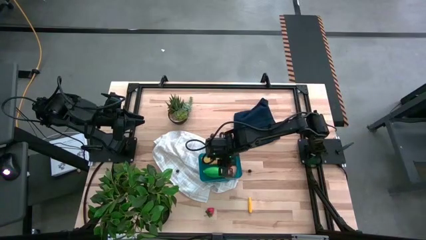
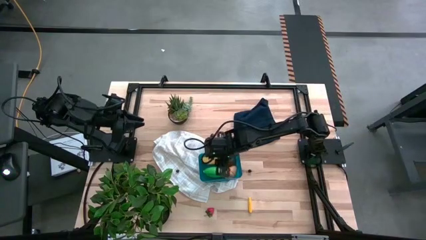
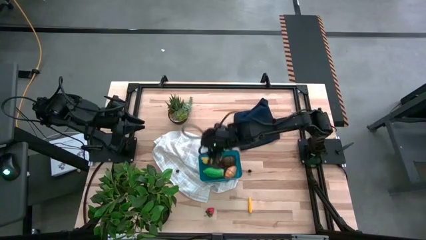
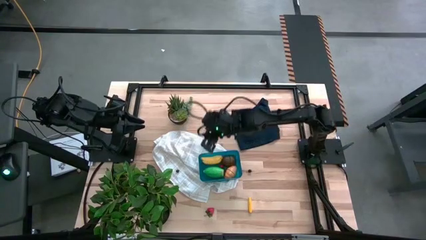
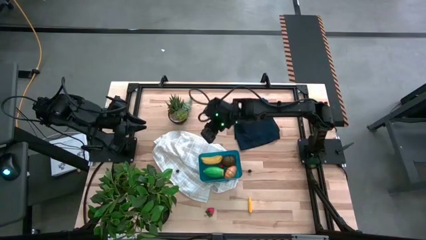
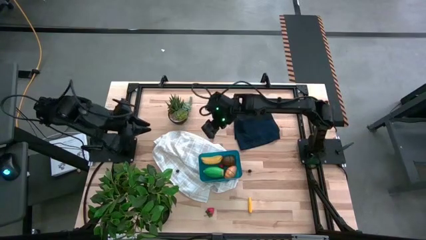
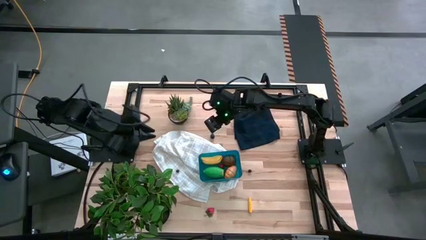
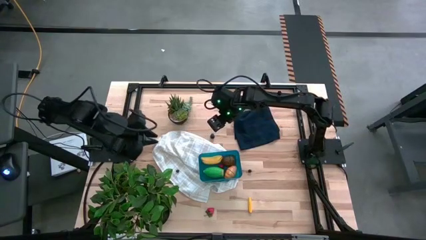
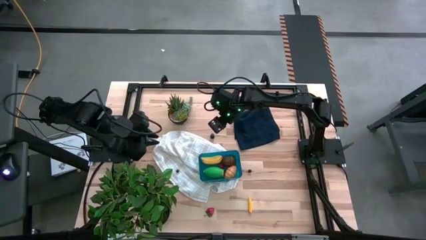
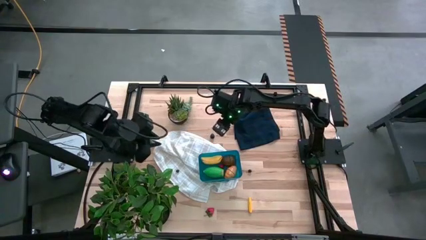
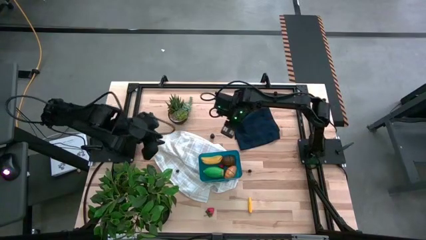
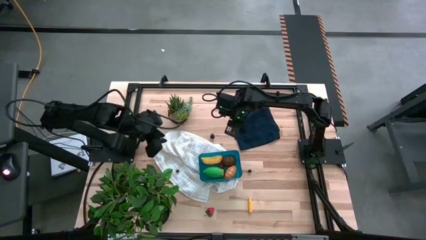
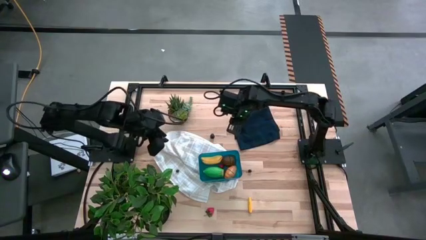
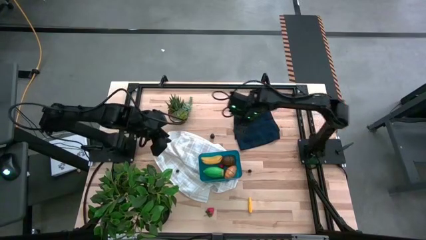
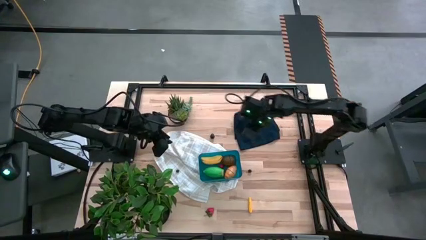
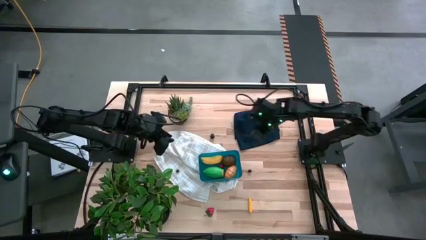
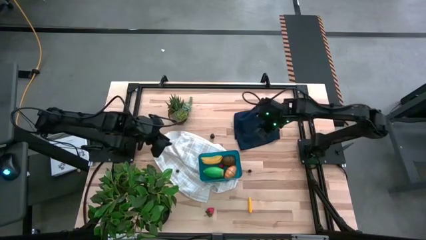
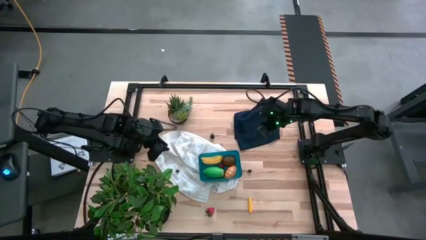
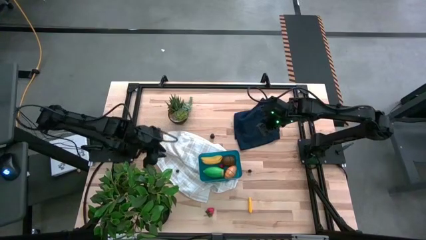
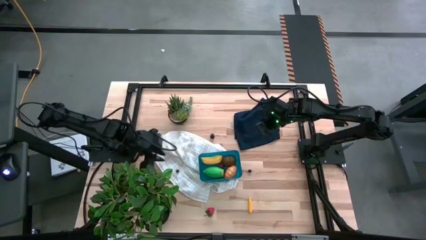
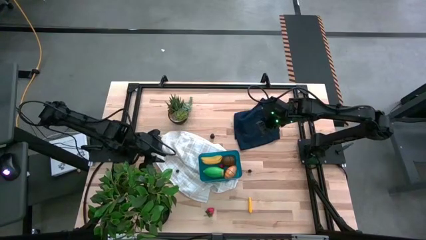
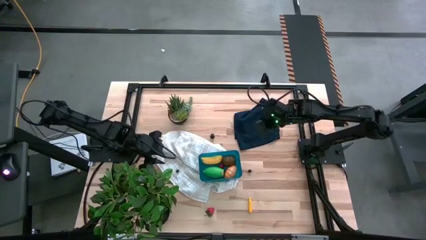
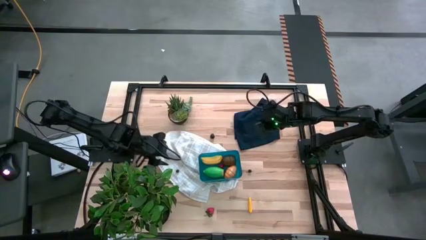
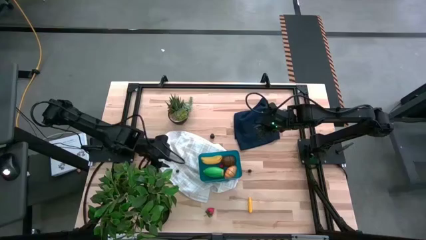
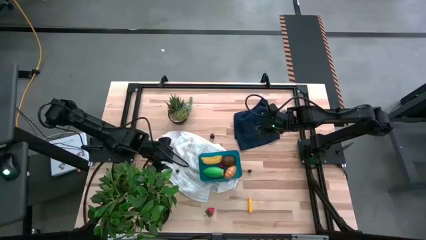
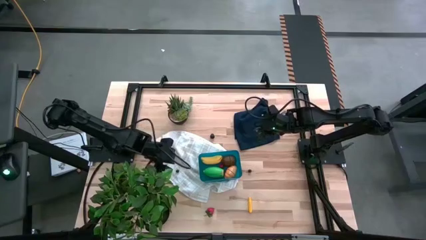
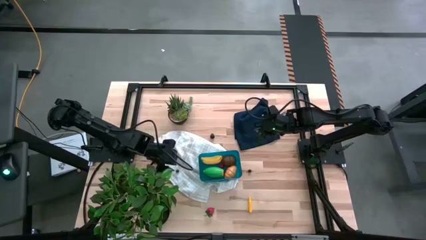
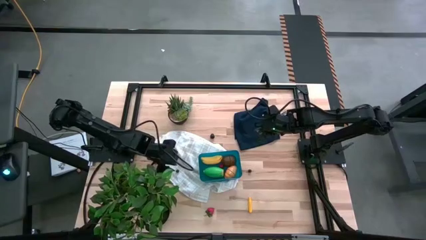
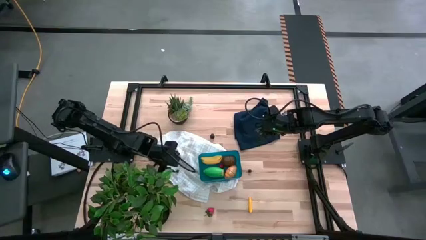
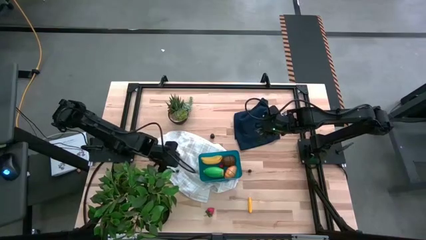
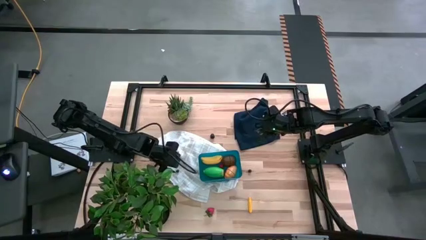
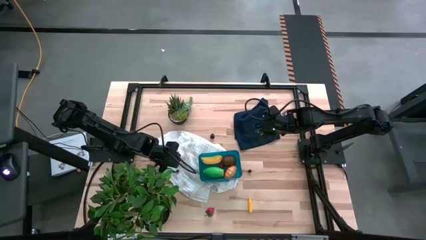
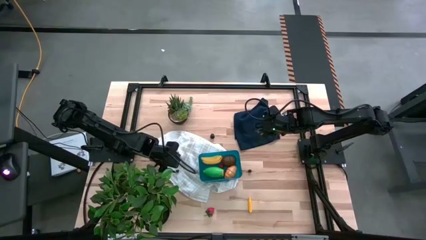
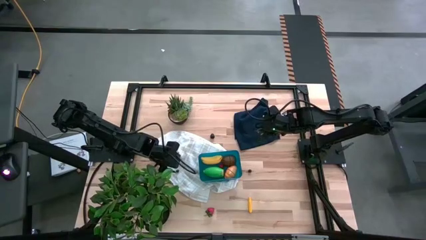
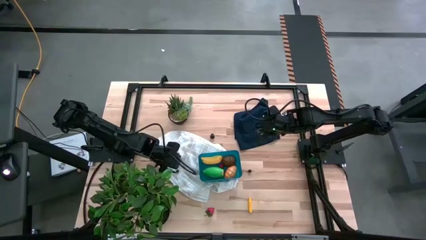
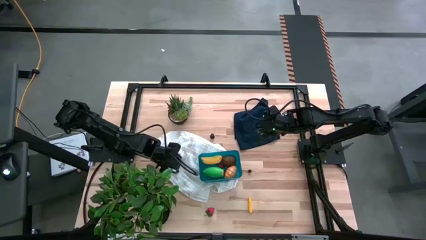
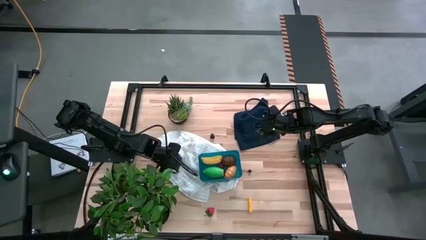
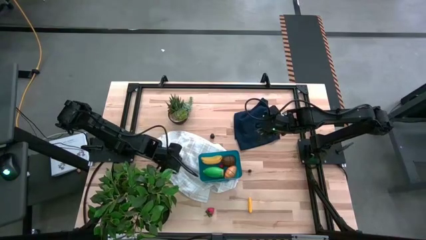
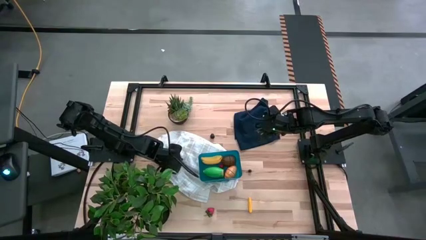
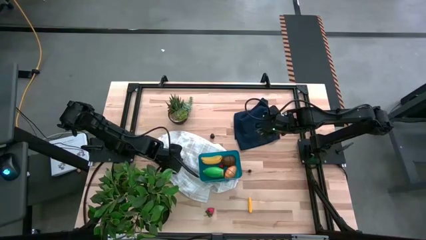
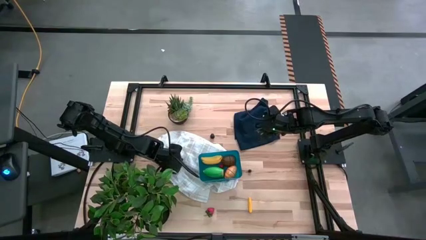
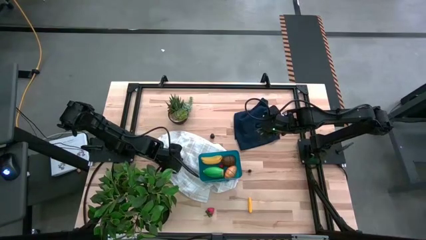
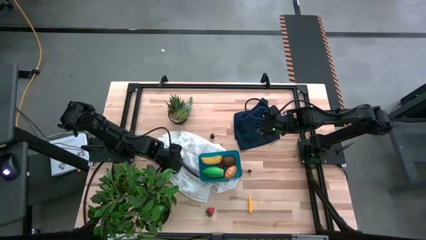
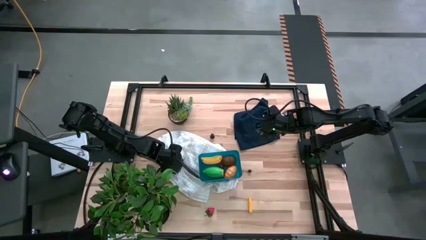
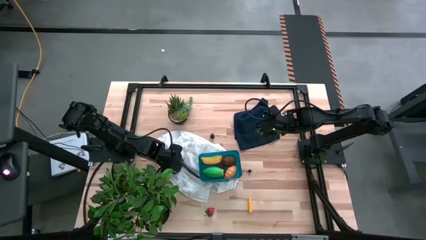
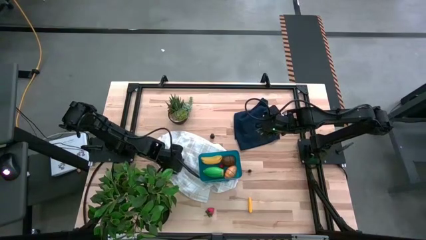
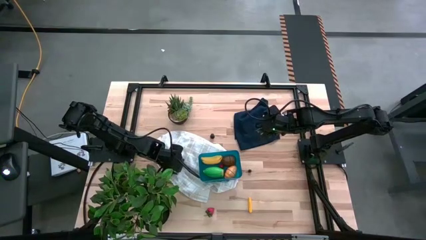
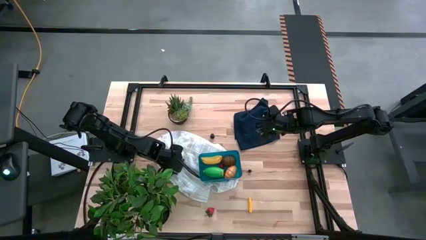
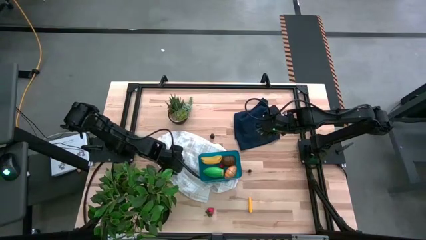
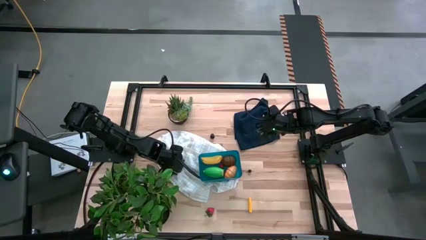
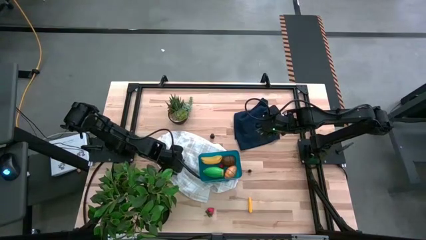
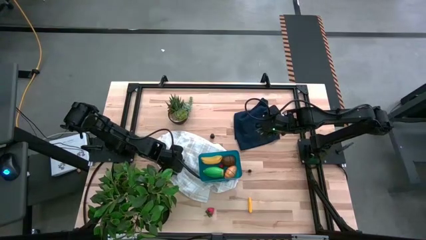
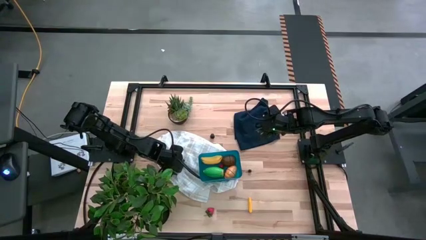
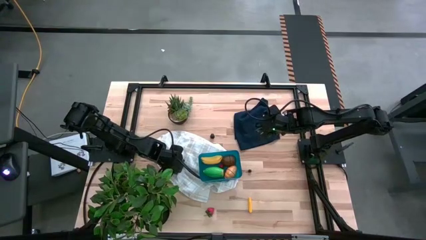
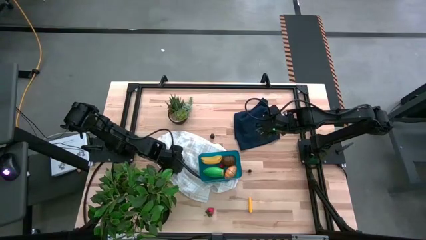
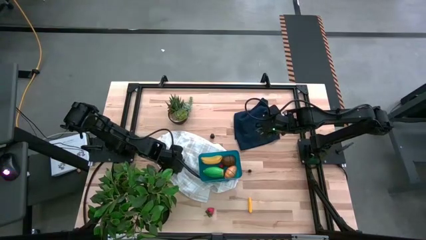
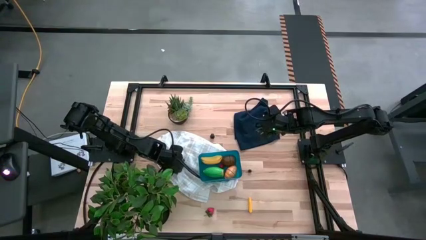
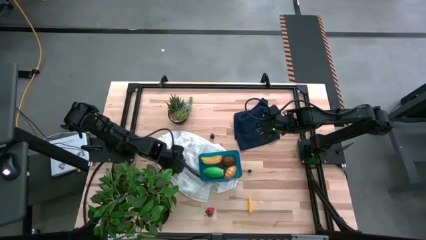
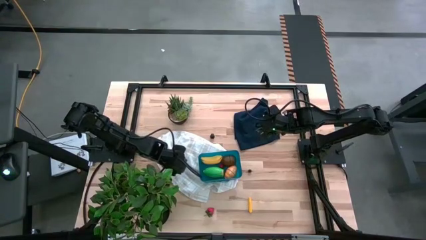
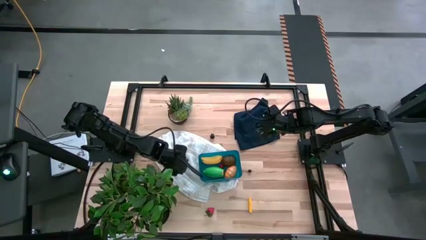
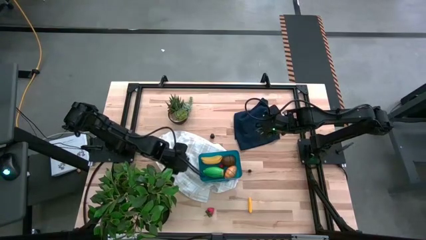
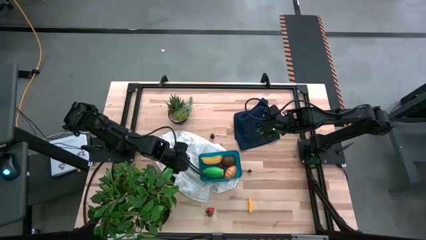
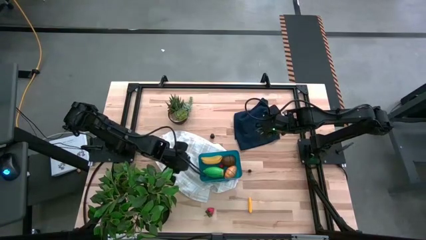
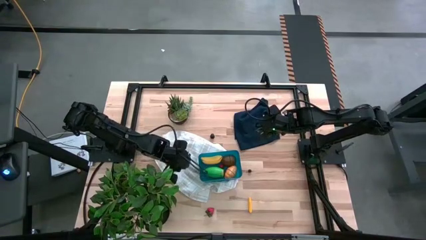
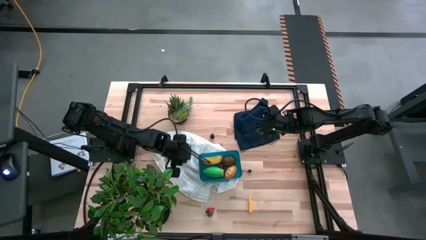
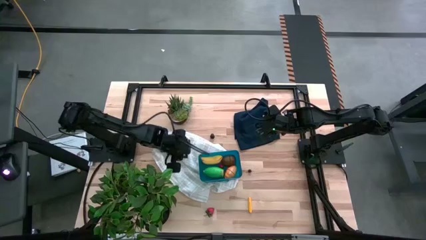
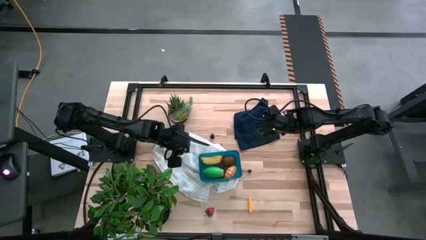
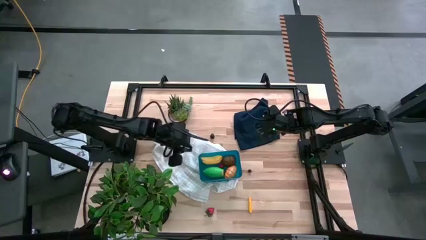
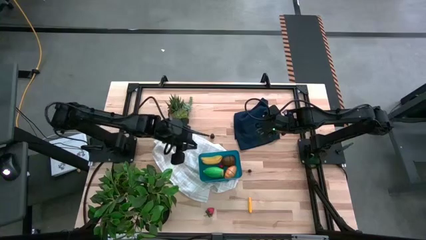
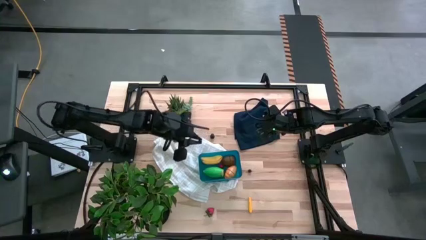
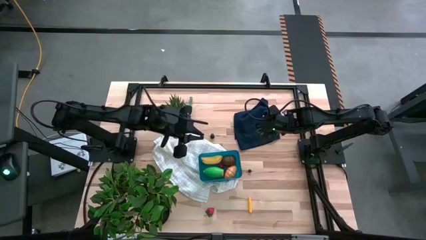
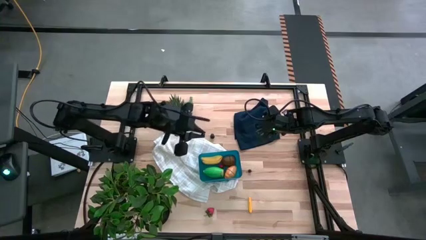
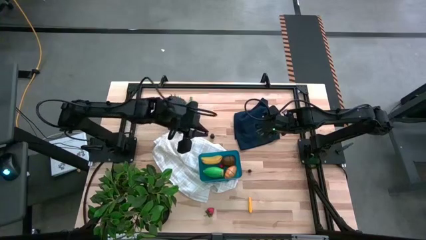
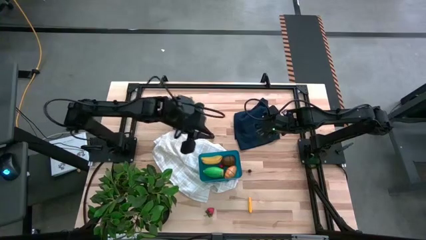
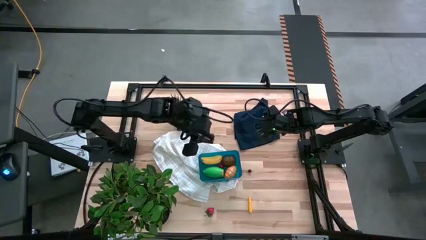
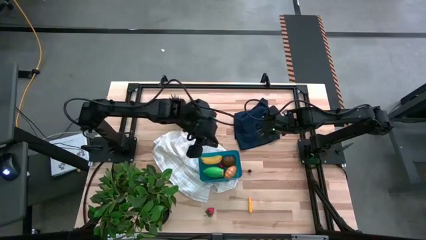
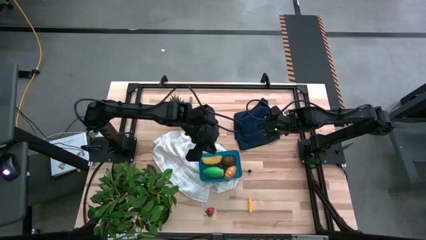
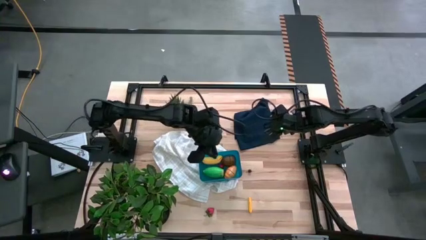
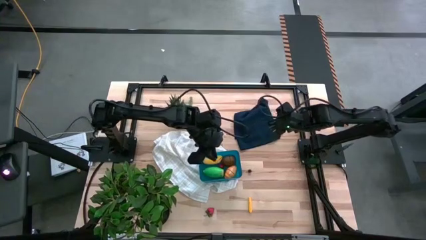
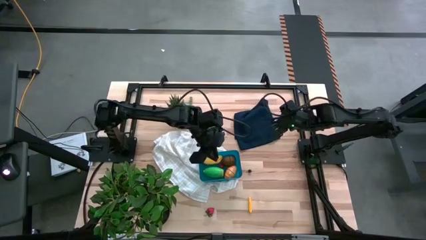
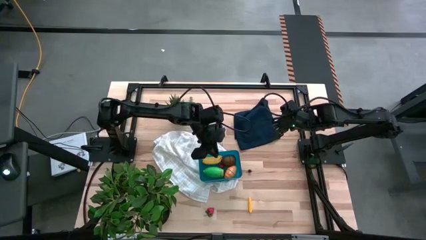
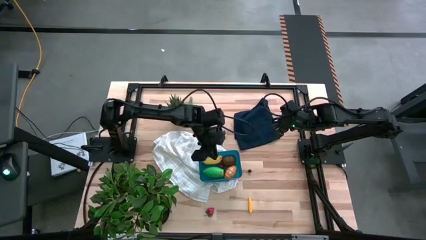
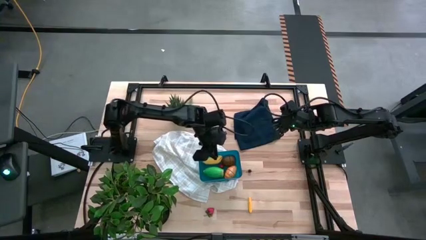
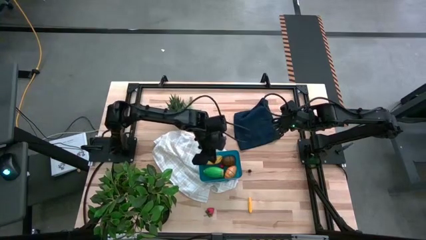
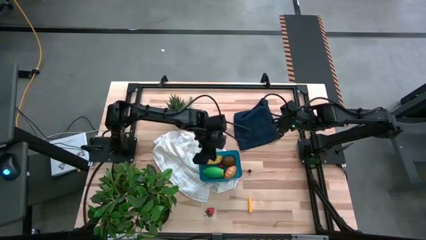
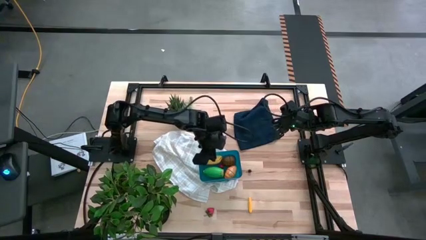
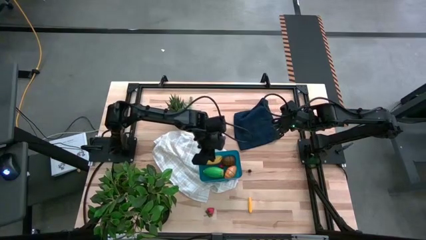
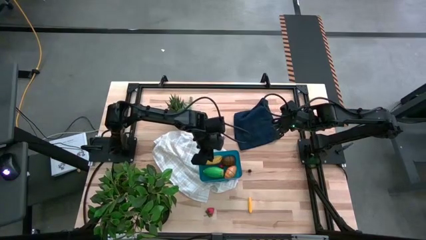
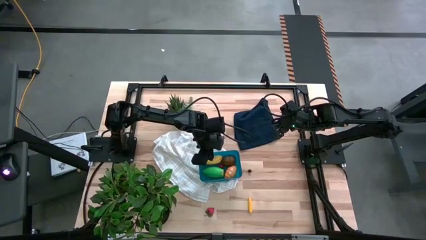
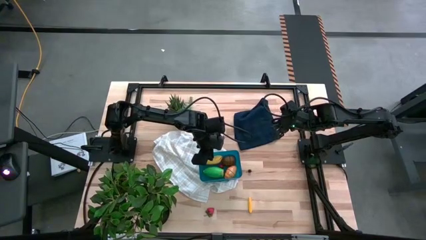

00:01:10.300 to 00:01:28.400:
Task: Pick and placing Produce into tupperware
Put the left blueberry into the blue bin
